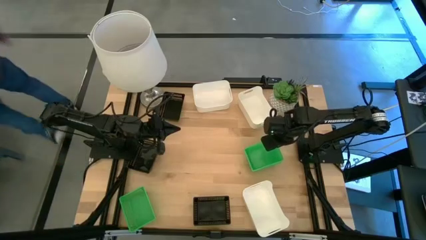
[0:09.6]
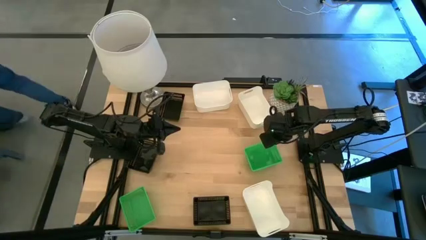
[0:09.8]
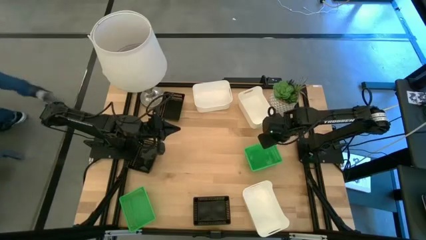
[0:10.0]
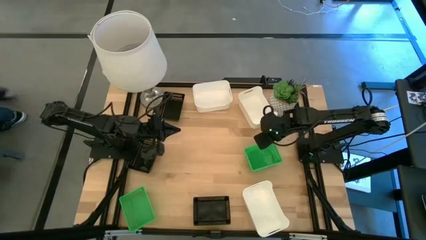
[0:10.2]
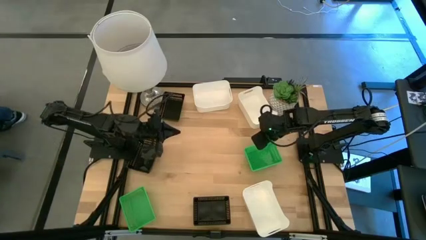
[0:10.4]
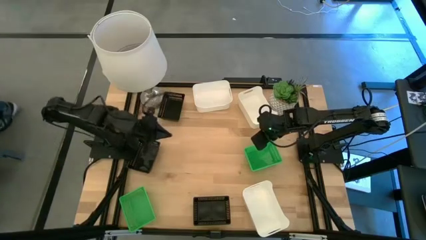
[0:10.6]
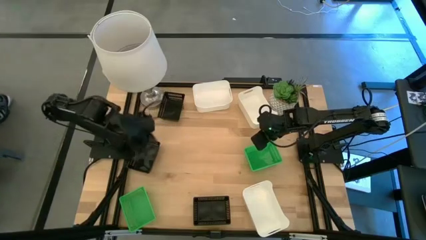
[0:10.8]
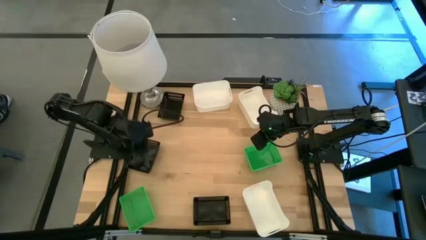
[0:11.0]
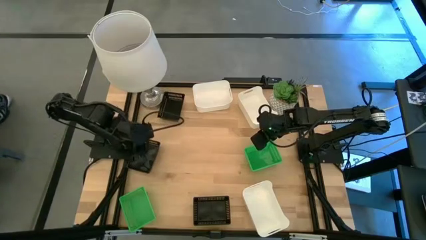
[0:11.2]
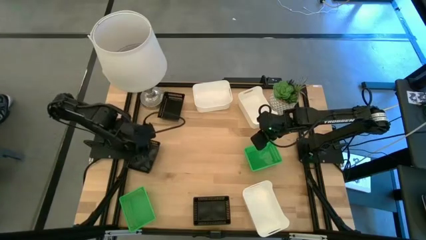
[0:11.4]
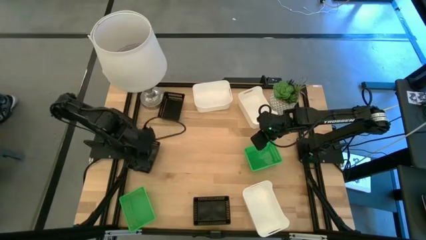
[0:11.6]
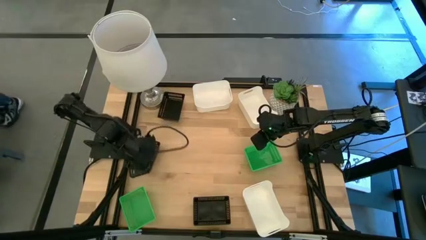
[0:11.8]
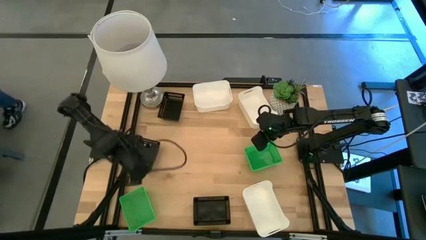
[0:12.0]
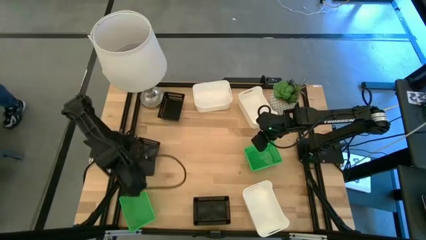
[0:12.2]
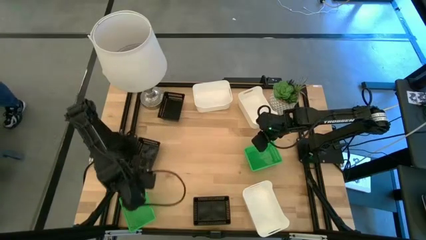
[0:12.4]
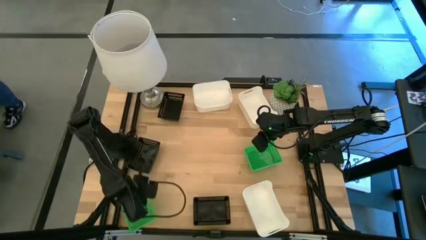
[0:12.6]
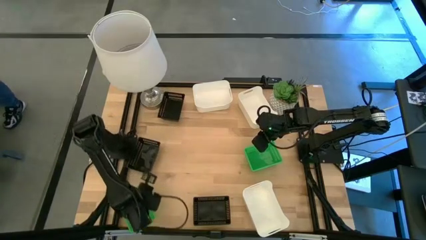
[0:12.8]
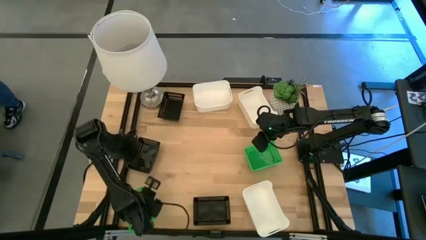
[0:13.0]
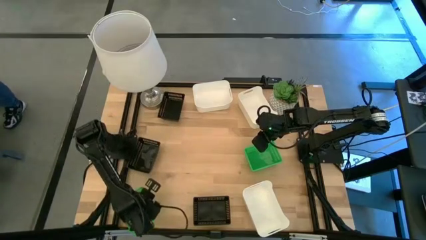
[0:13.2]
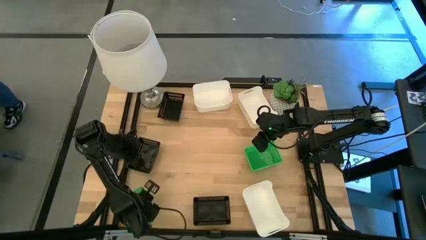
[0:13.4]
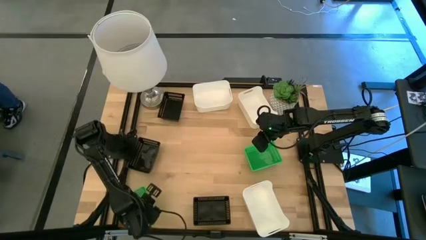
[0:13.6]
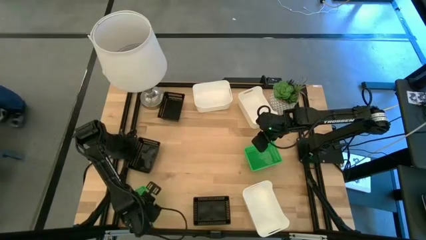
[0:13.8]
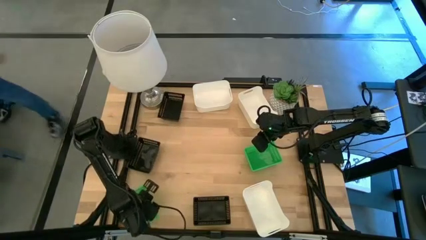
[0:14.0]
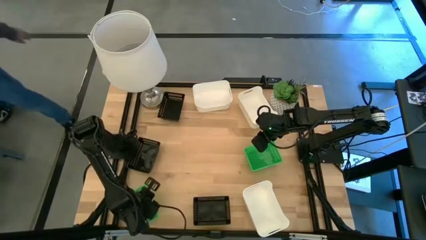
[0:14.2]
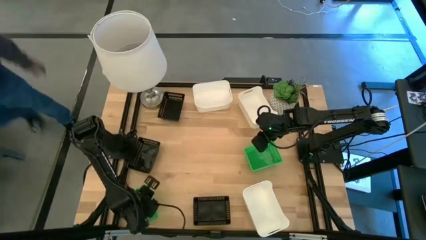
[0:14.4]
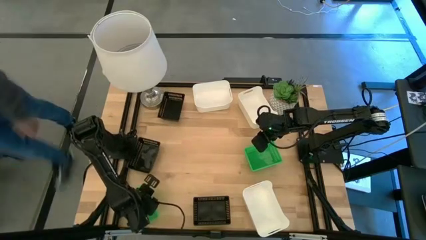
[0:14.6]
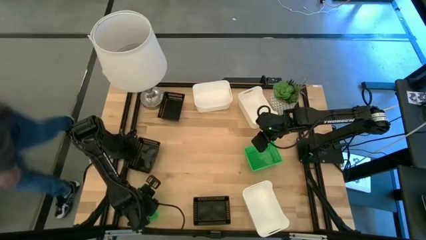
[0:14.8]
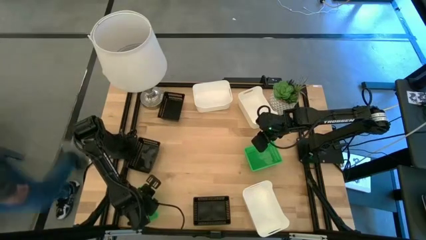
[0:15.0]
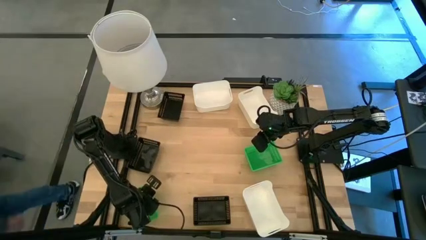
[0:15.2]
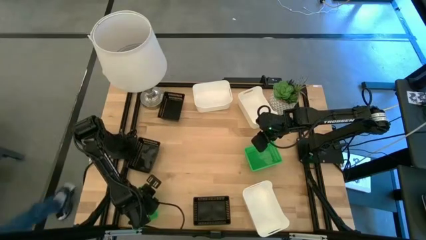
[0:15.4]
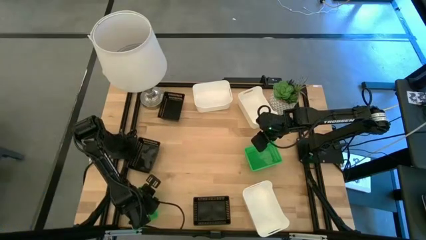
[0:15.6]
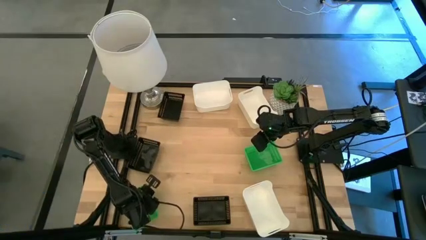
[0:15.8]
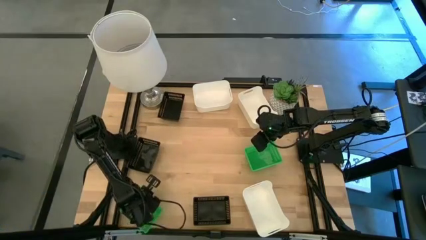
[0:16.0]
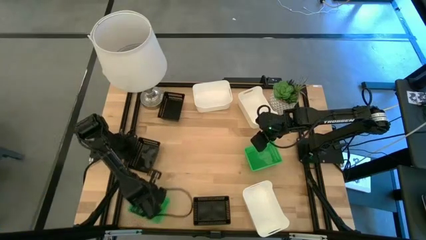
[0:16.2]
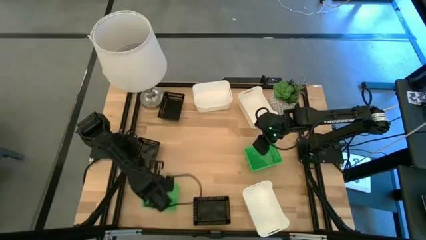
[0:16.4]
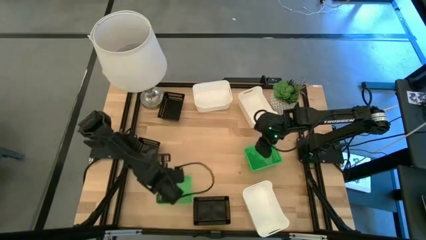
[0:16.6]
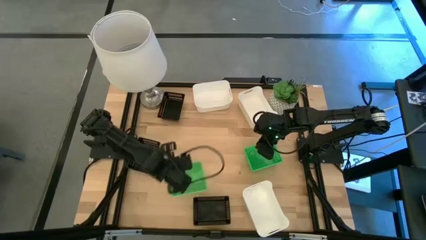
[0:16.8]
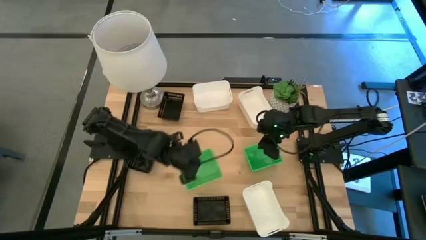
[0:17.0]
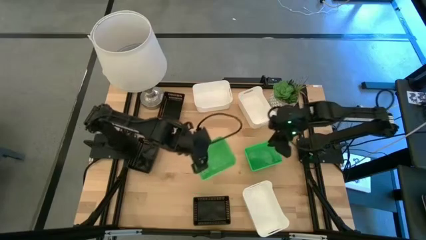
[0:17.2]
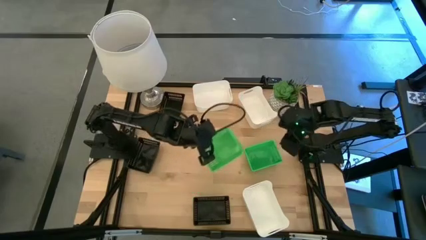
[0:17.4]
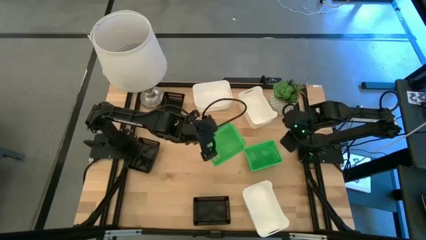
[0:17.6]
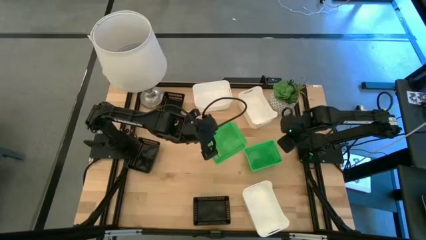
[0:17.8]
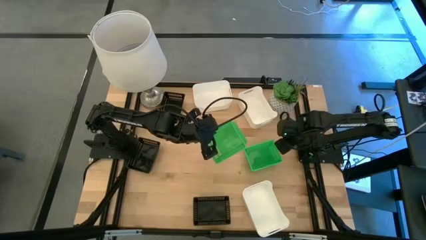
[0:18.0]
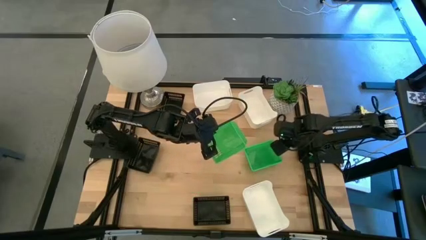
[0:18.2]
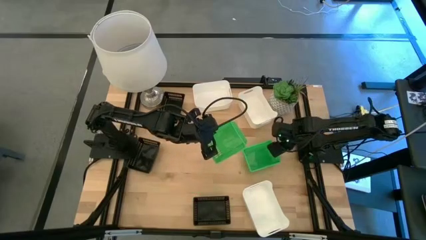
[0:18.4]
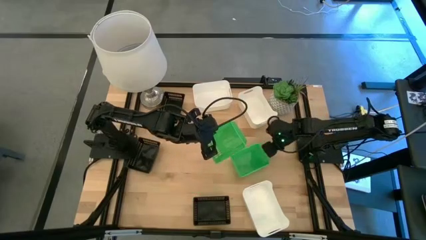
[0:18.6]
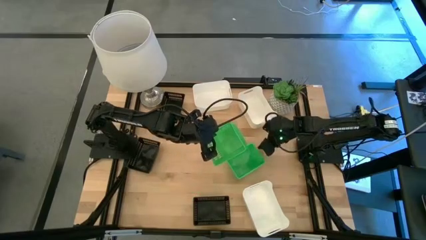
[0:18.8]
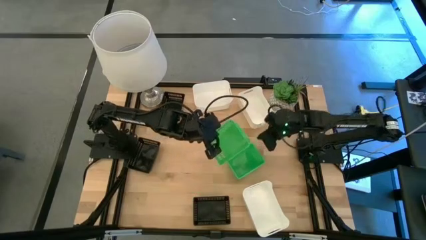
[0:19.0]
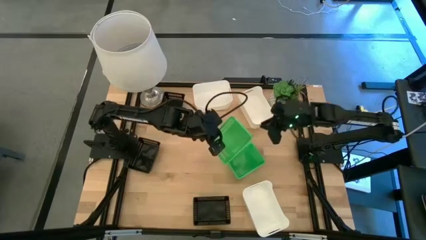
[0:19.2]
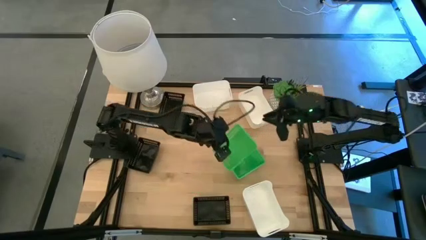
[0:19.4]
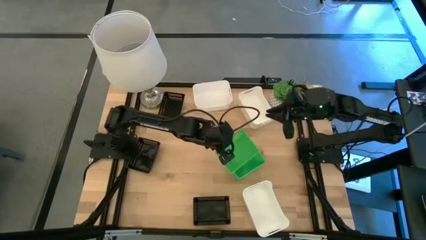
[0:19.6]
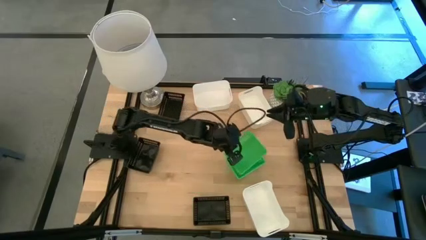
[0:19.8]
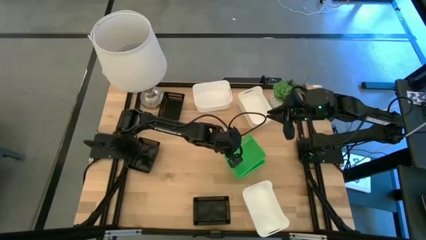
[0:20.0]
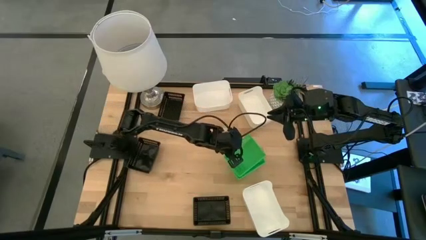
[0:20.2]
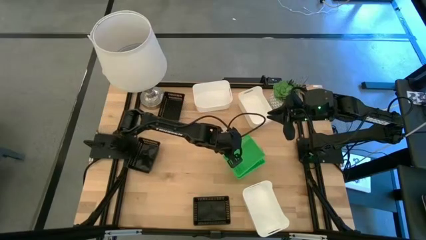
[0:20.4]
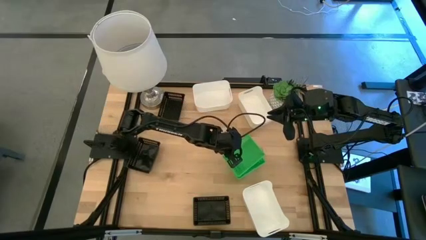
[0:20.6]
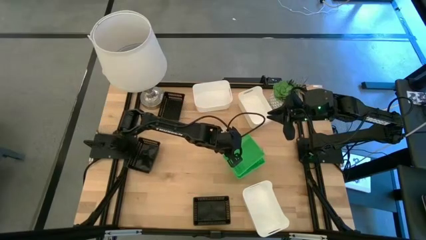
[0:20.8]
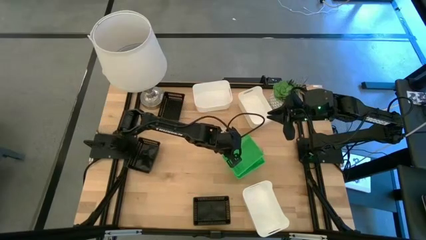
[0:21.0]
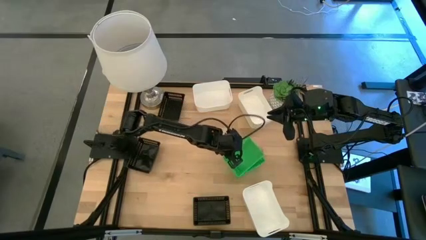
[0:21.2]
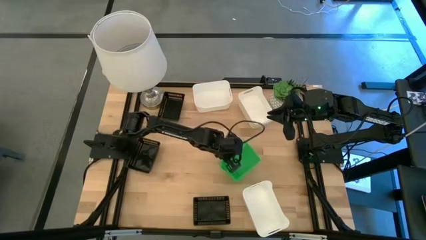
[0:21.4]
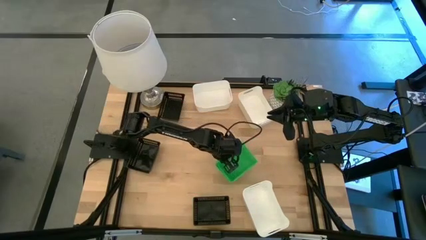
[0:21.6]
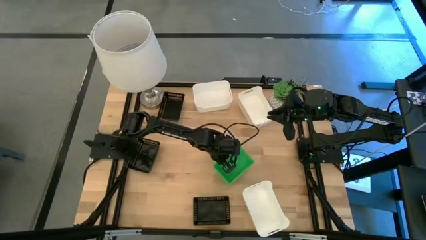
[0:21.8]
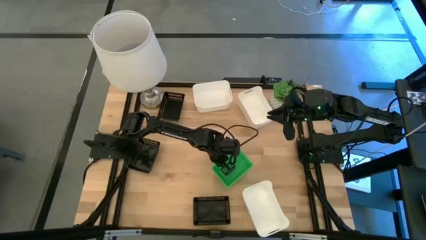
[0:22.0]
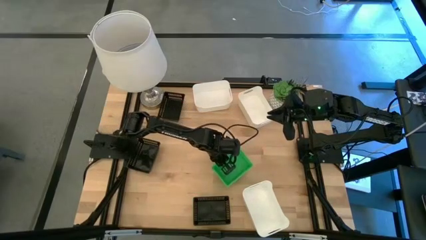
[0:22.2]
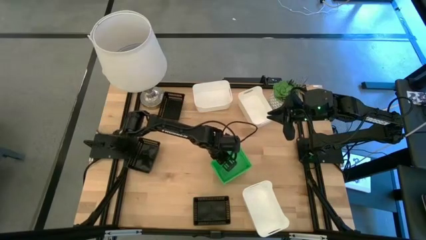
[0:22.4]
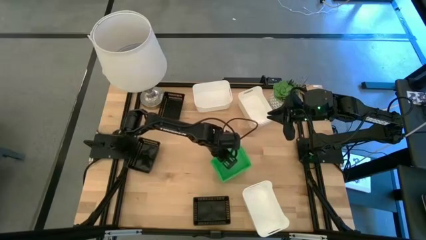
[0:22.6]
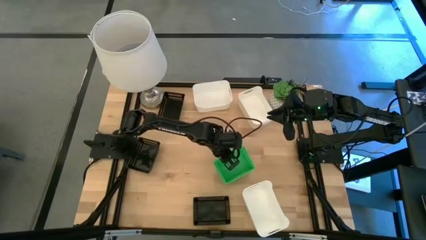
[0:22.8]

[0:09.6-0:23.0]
Stack the bottom green bin on the top green bins
